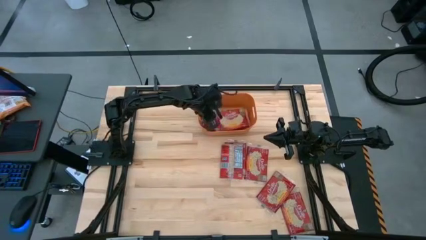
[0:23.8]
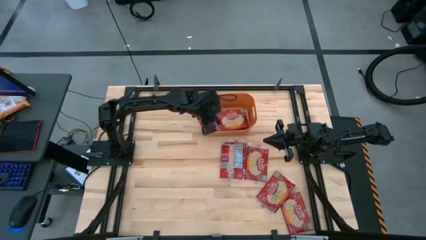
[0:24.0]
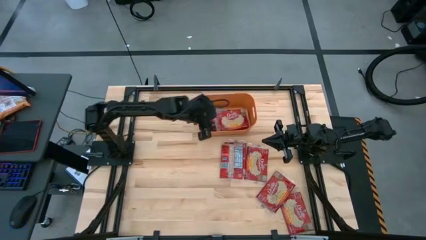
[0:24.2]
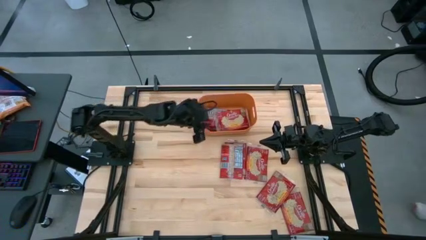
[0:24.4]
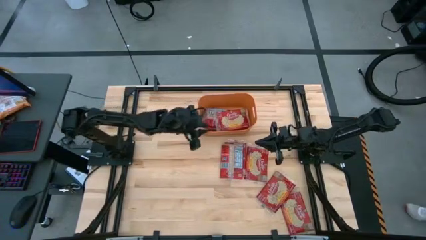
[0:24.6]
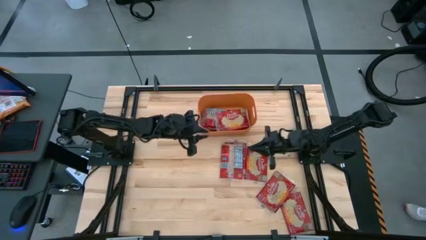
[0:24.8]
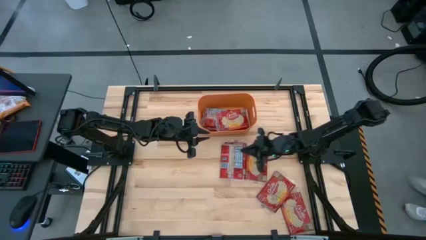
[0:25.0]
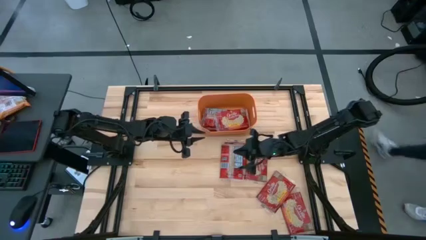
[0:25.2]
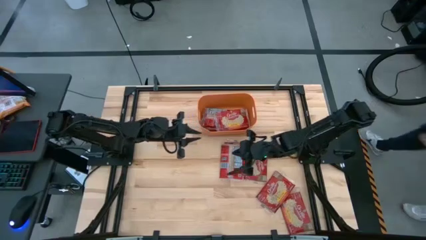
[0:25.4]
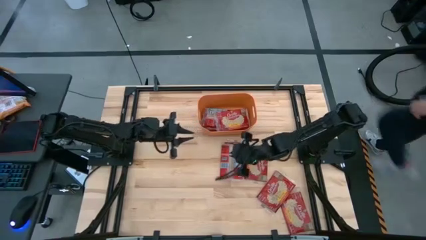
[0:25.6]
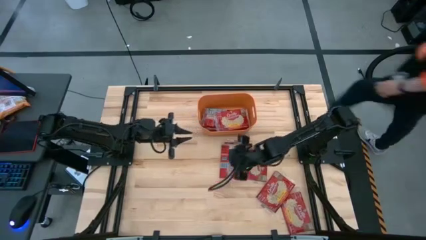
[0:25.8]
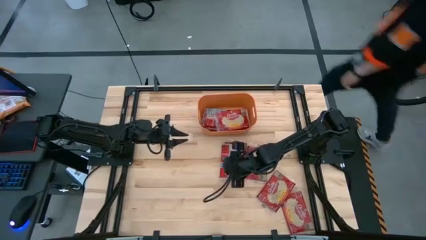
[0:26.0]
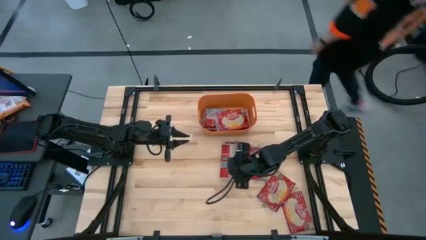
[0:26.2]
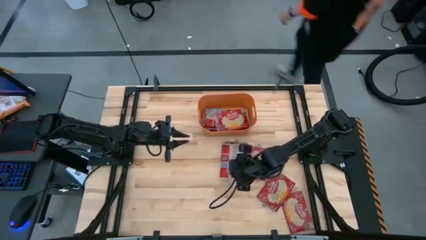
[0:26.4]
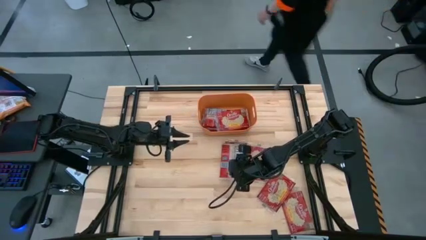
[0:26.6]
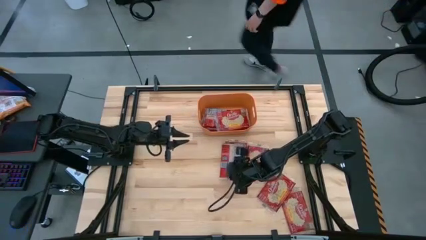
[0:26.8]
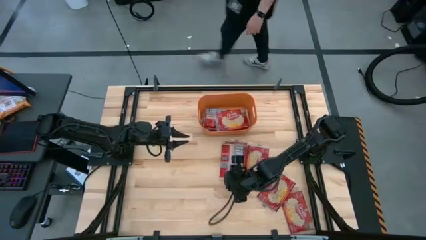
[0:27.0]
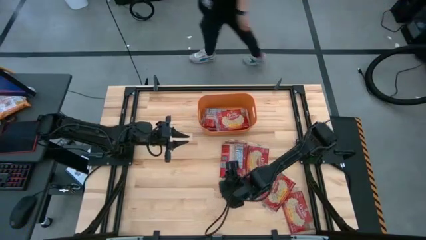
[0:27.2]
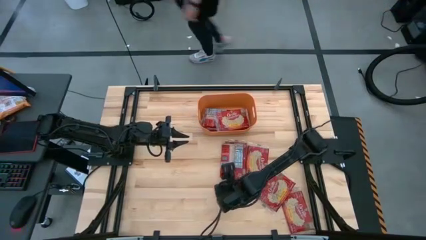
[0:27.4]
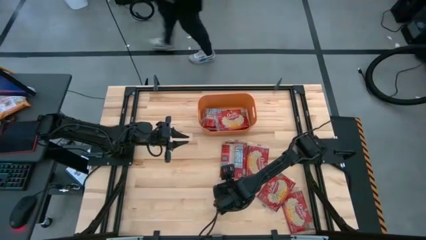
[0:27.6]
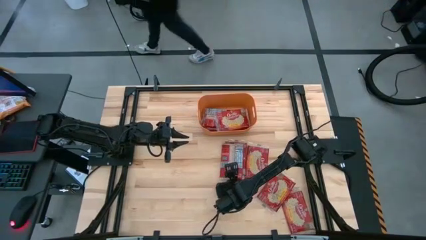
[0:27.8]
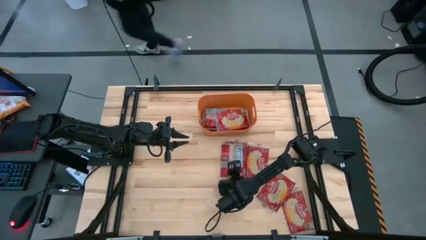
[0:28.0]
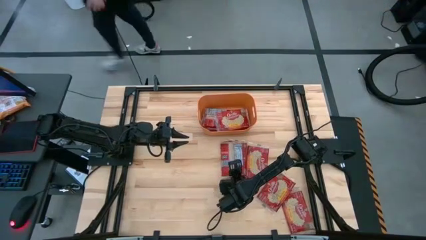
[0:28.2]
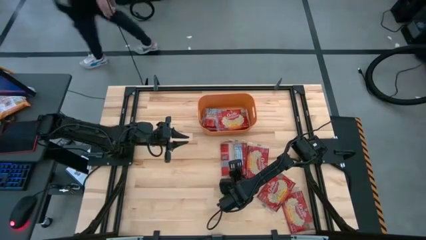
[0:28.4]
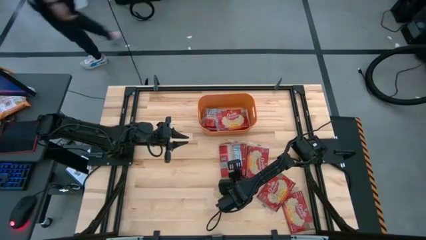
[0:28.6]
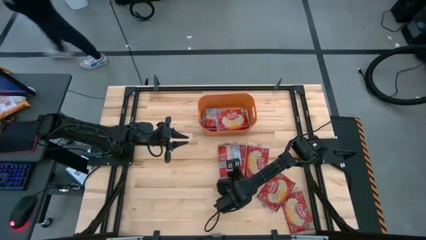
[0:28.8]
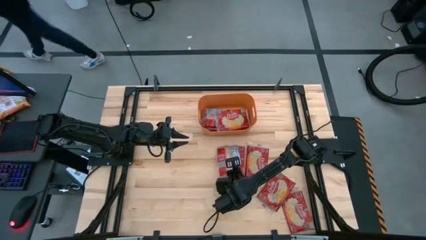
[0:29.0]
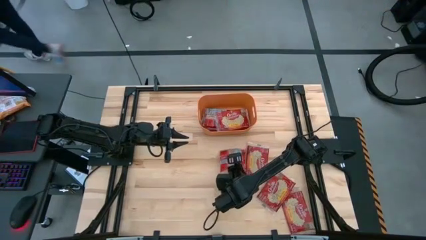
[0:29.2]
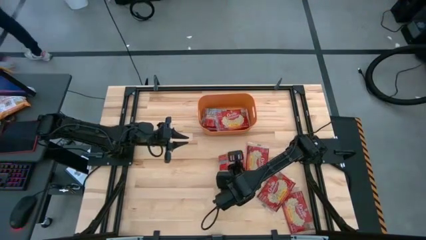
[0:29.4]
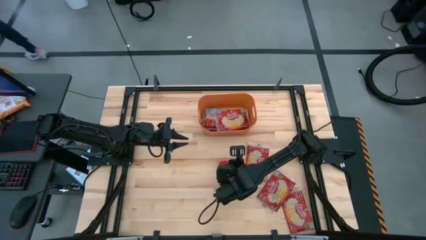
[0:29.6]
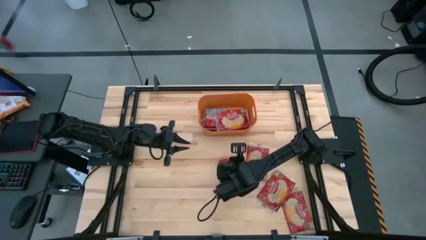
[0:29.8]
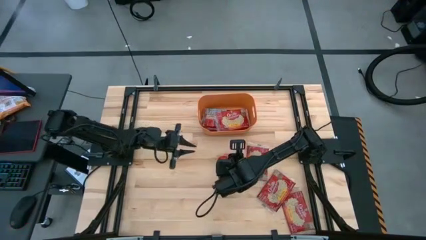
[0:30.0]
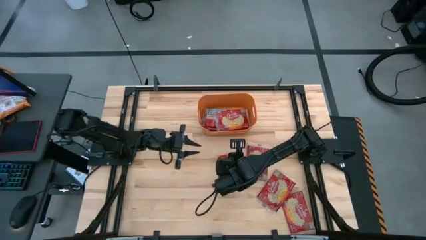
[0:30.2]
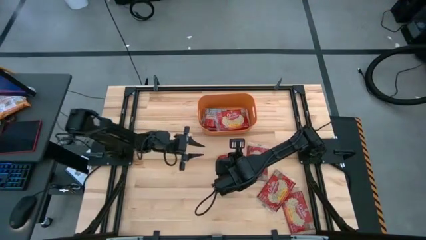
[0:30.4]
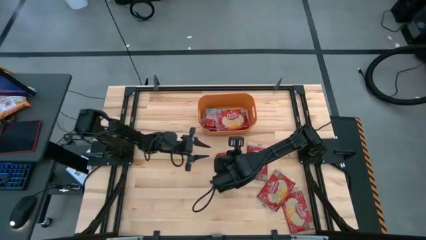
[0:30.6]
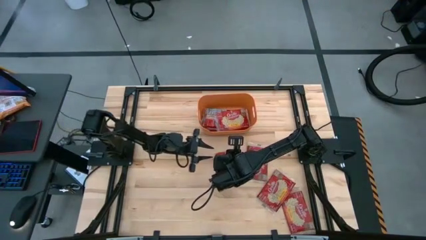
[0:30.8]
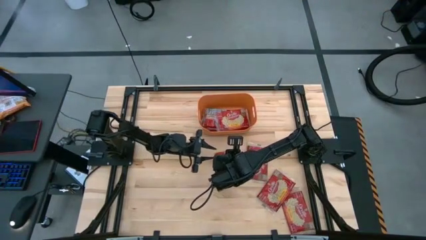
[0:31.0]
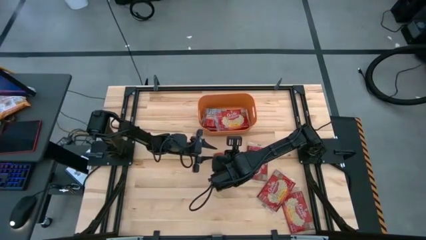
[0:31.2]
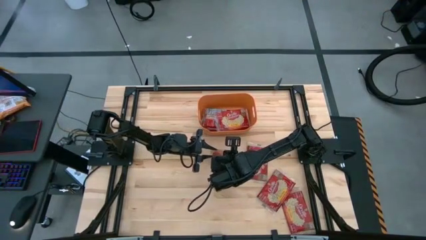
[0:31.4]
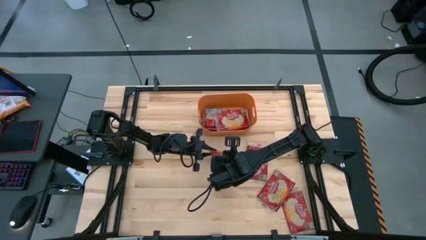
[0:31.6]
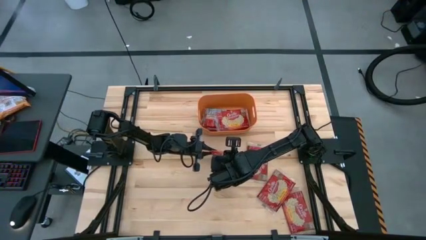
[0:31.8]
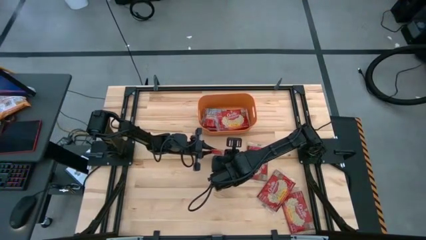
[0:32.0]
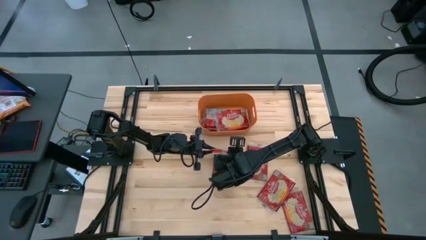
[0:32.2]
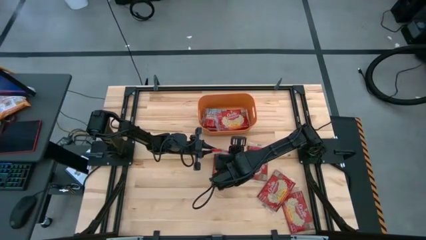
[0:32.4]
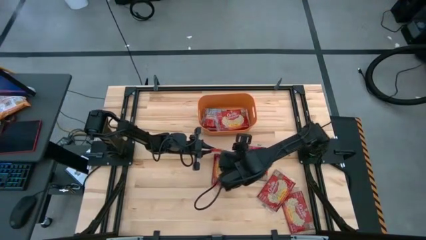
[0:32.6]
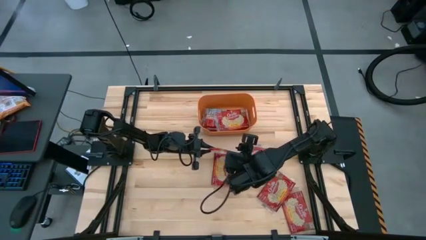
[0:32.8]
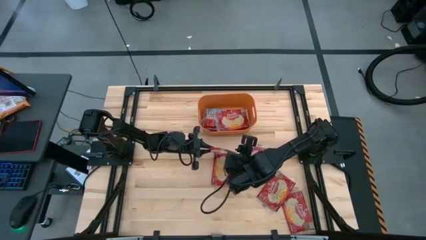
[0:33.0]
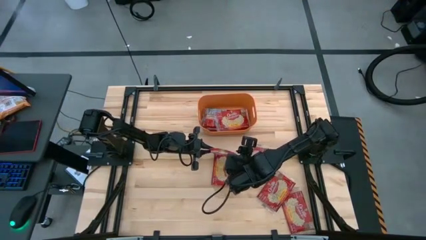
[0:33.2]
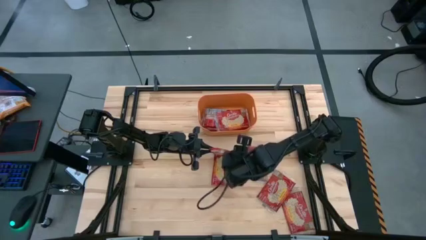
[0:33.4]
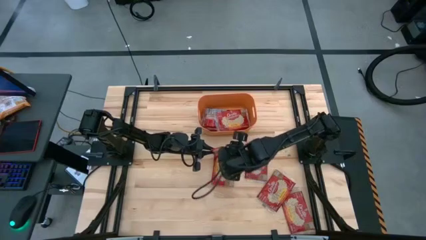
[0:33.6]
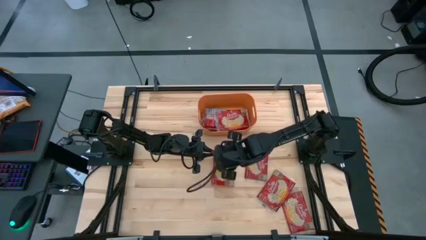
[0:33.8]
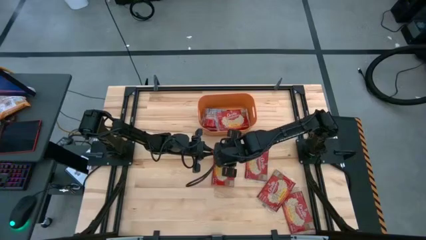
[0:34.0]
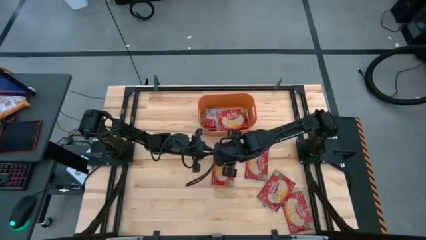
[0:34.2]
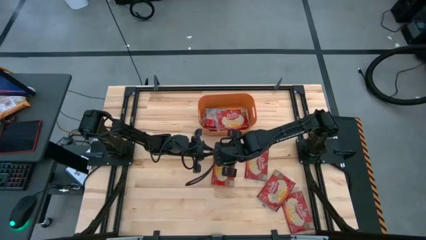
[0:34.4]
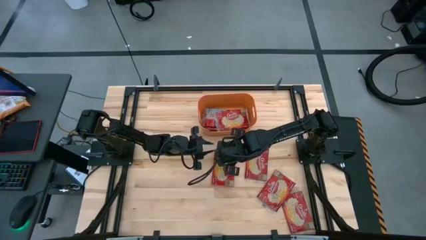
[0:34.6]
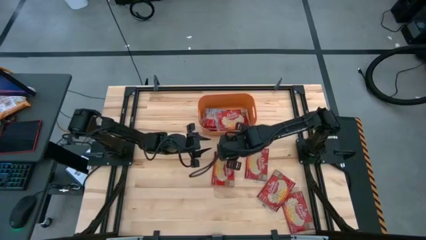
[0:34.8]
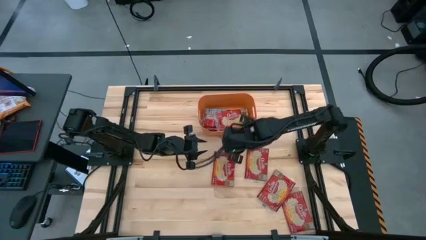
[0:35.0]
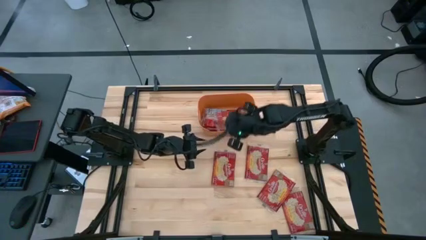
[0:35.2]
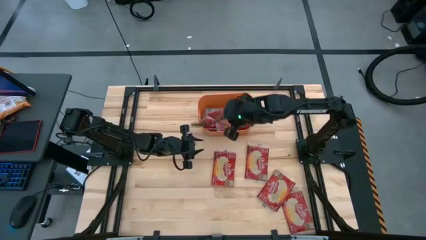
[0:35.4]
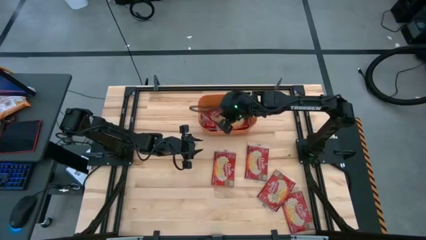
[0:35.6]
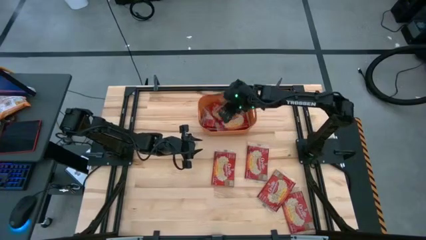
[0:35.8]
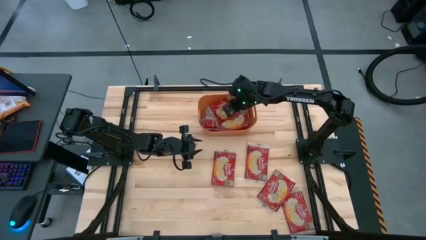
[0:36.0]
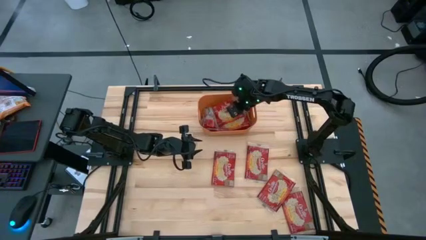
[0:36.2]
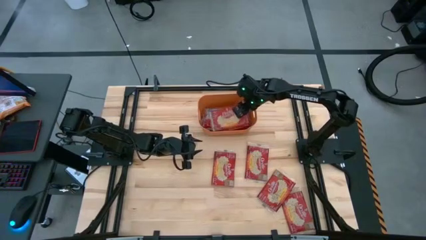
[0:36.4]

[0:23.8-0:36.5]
Task: Sort popcorn bags into baskets
Put the red popcorn bag into the orange bin
